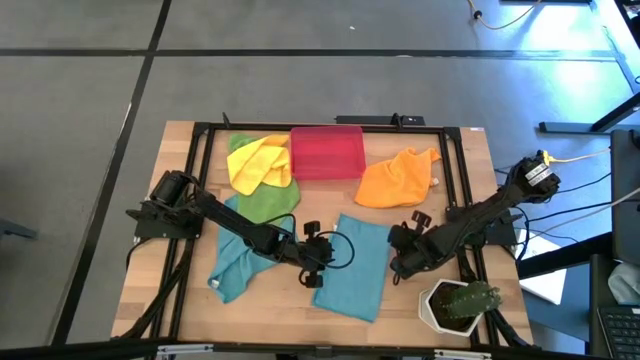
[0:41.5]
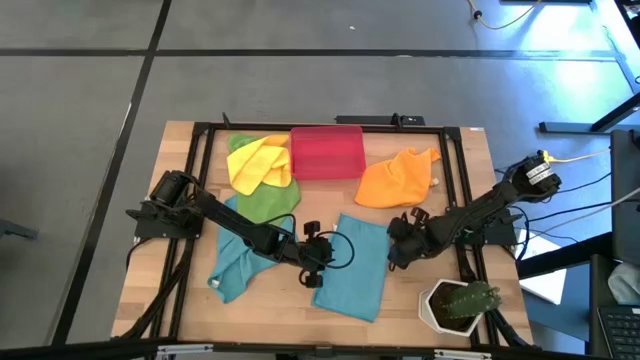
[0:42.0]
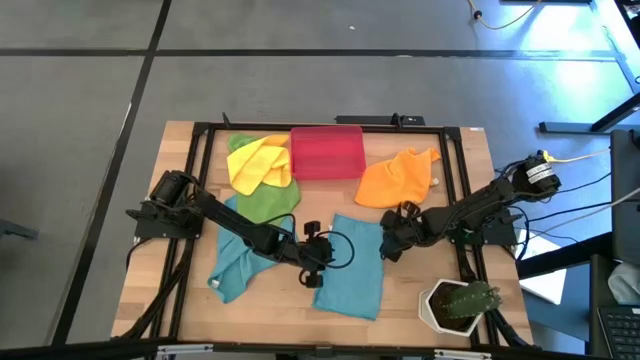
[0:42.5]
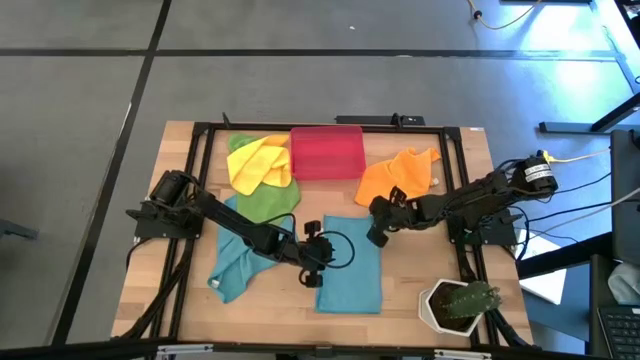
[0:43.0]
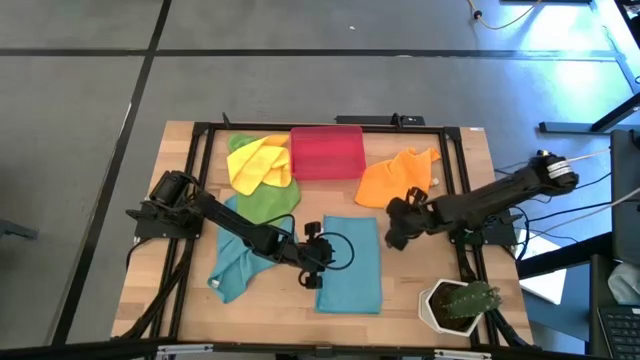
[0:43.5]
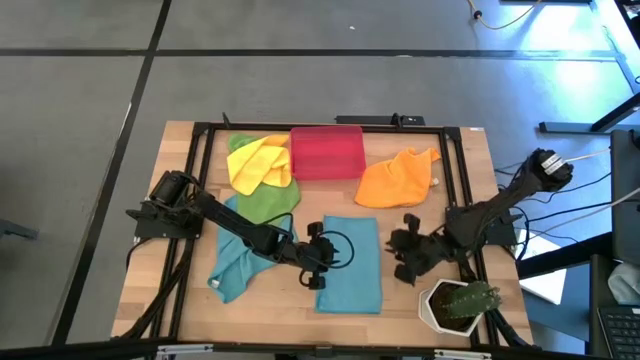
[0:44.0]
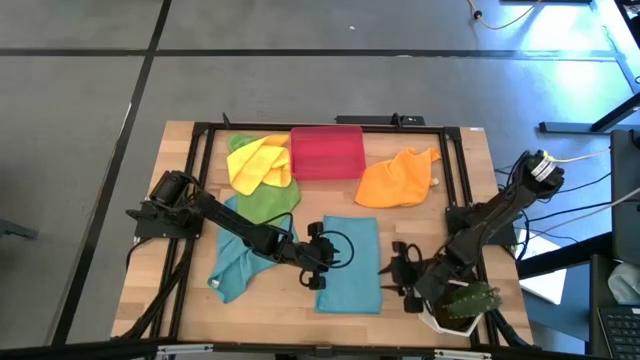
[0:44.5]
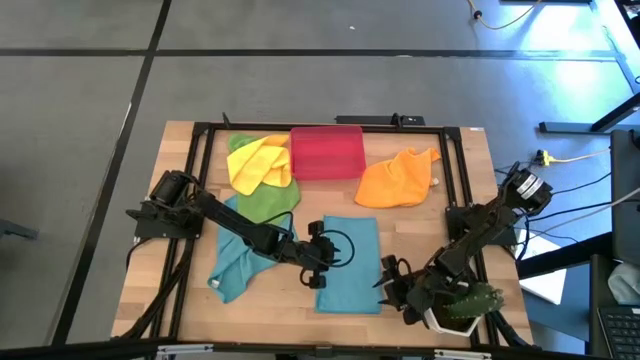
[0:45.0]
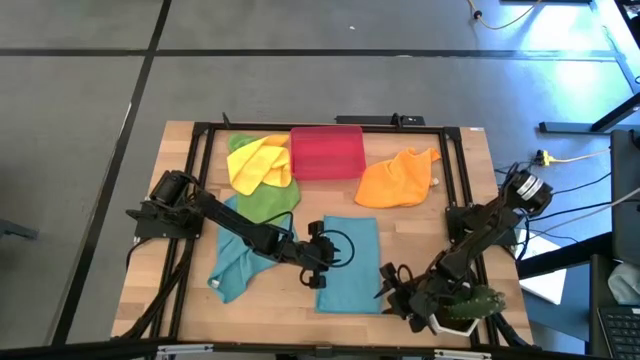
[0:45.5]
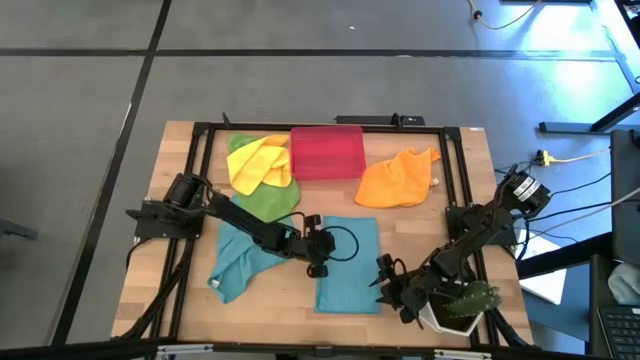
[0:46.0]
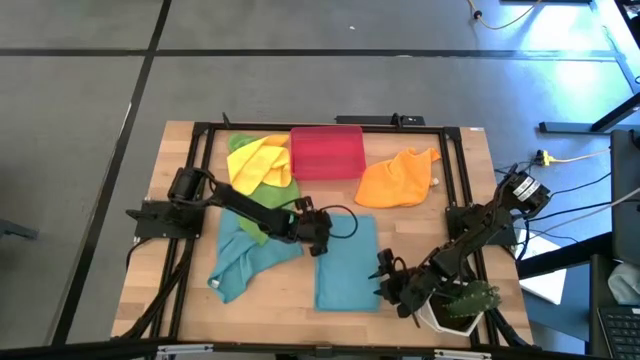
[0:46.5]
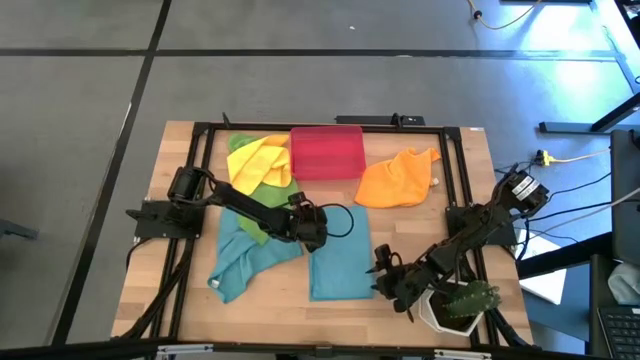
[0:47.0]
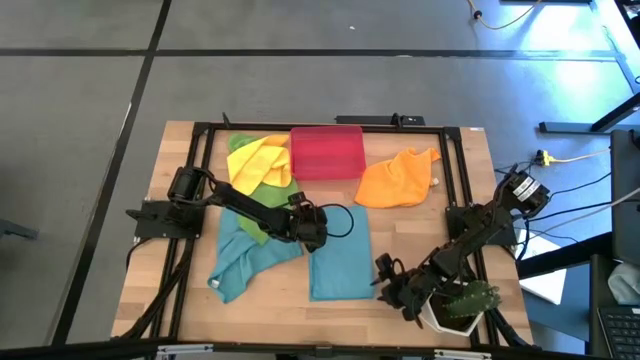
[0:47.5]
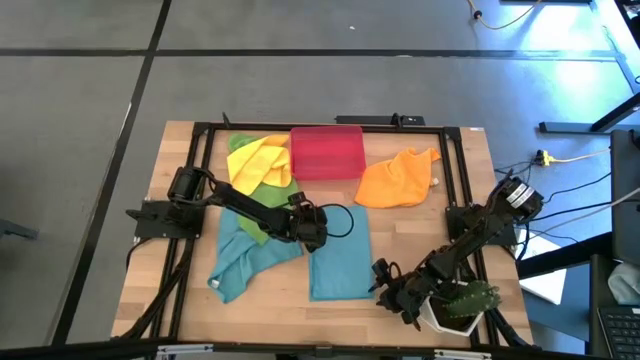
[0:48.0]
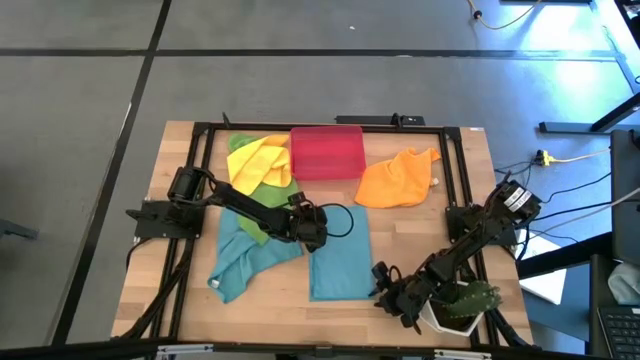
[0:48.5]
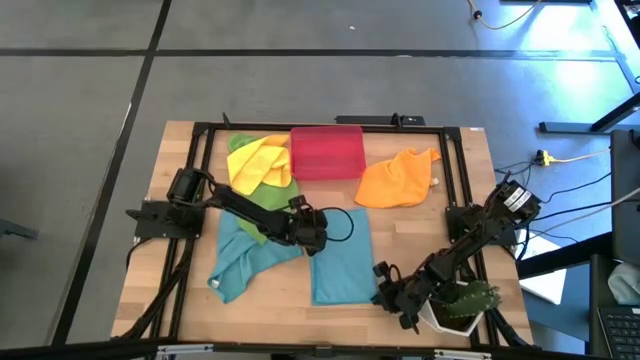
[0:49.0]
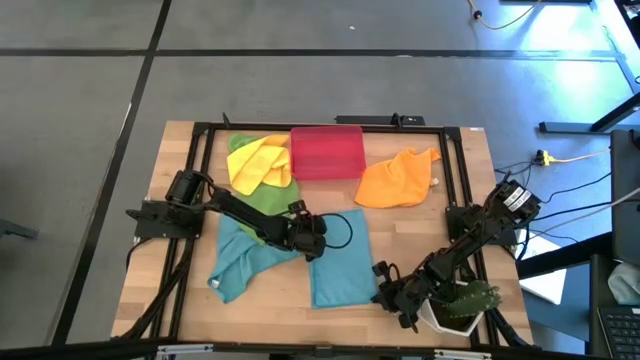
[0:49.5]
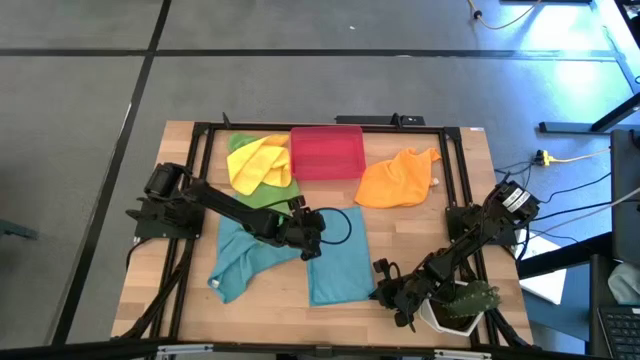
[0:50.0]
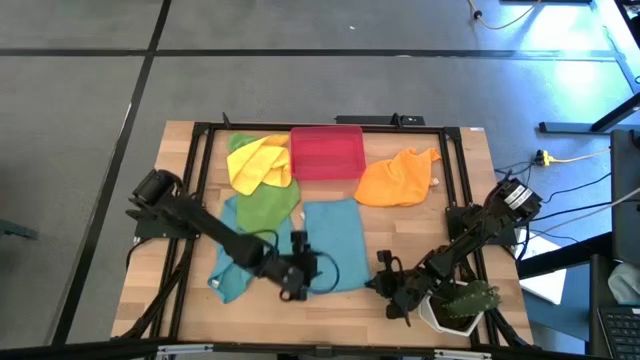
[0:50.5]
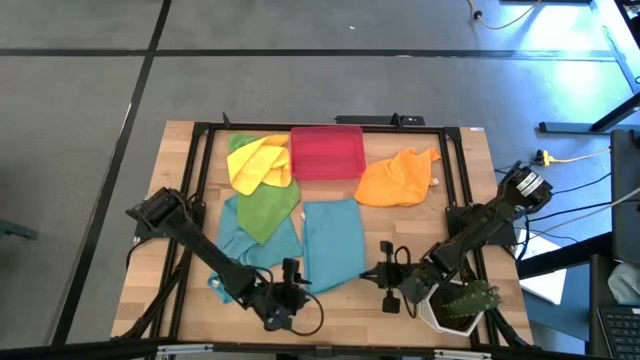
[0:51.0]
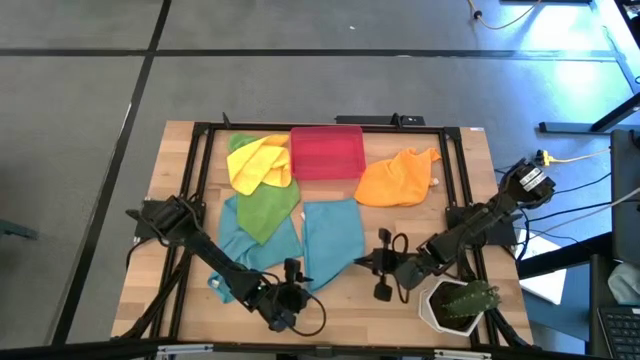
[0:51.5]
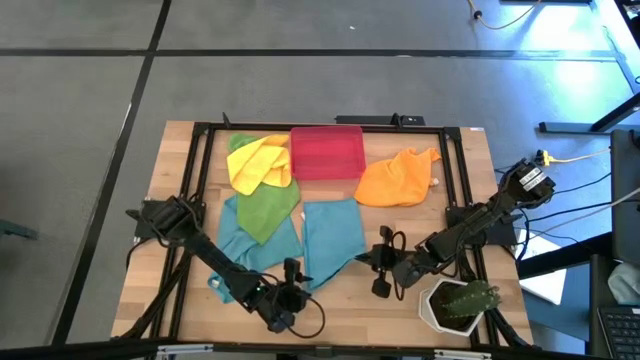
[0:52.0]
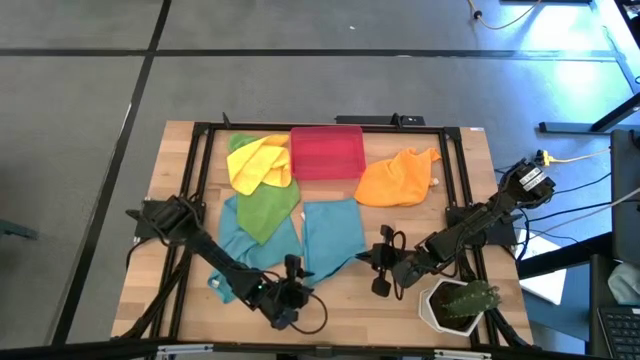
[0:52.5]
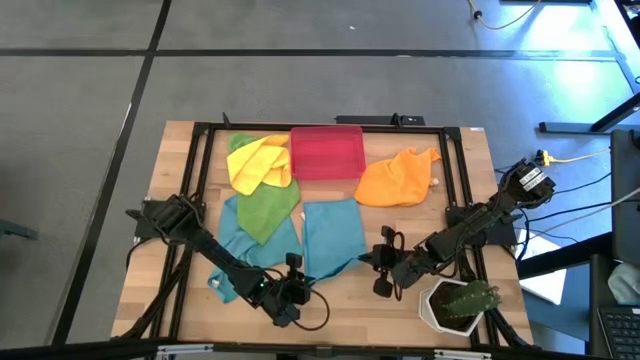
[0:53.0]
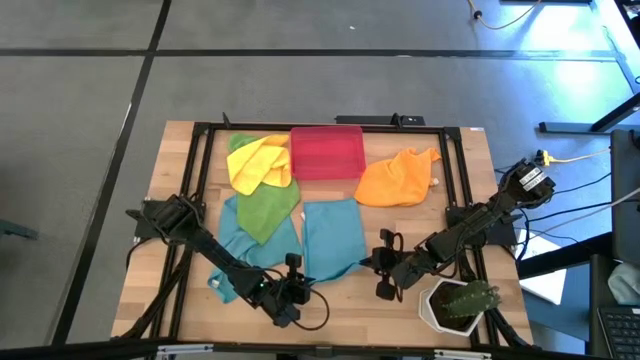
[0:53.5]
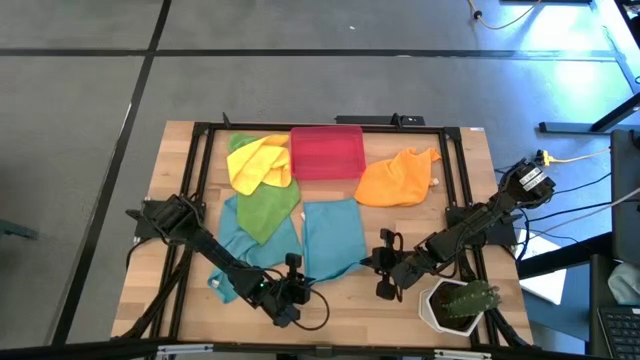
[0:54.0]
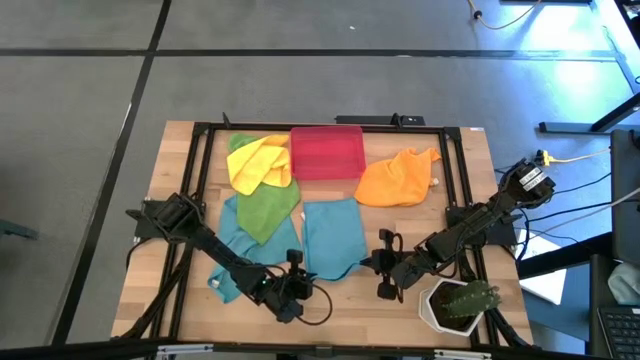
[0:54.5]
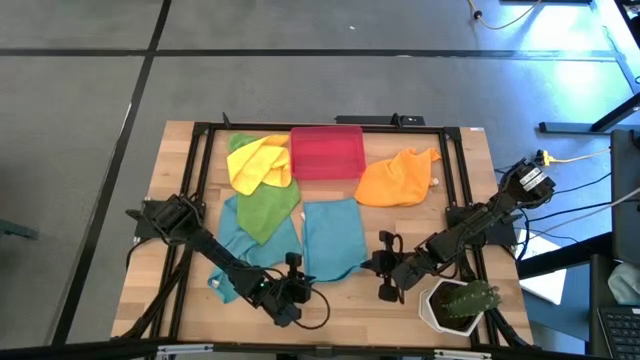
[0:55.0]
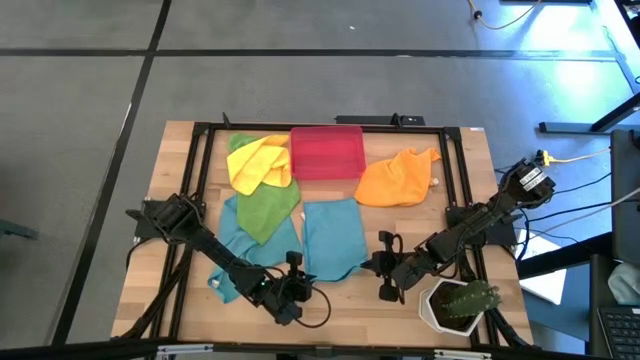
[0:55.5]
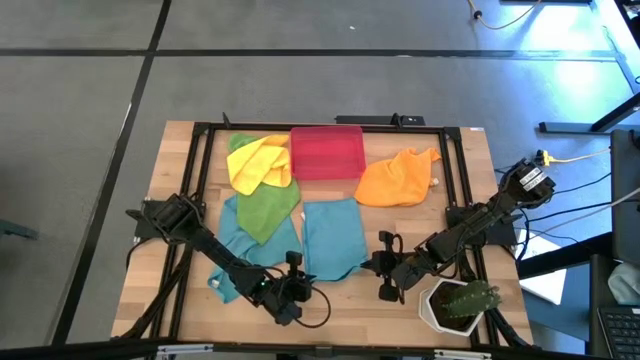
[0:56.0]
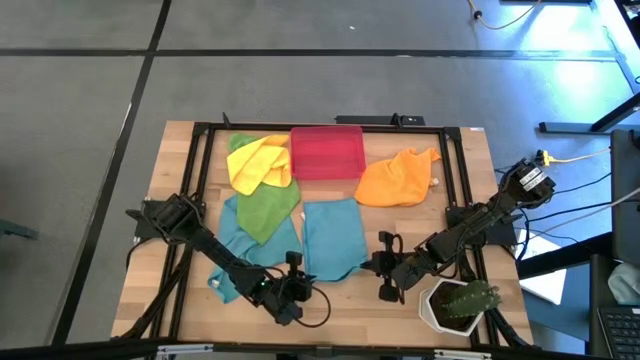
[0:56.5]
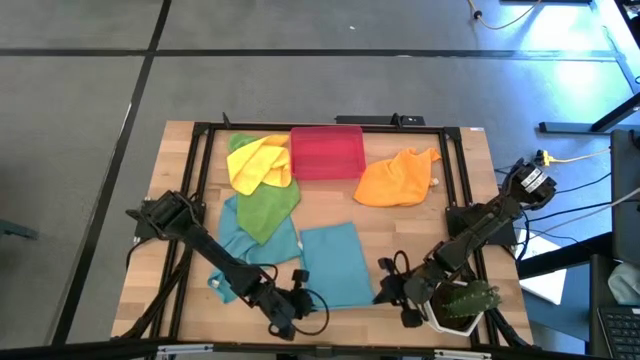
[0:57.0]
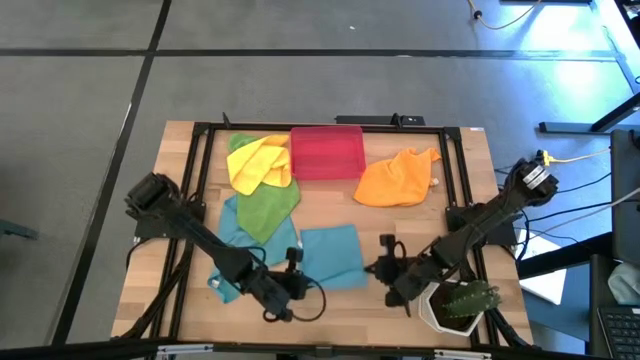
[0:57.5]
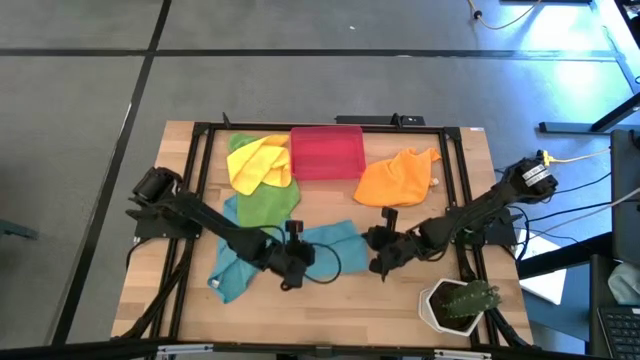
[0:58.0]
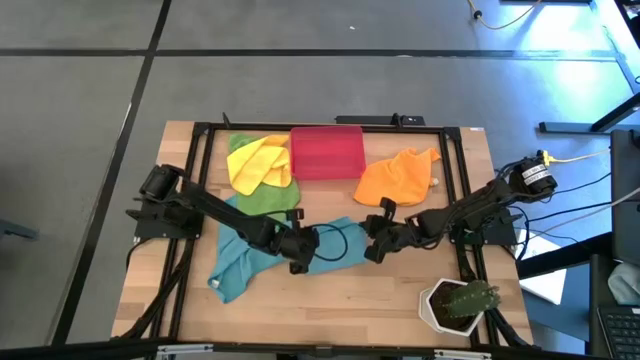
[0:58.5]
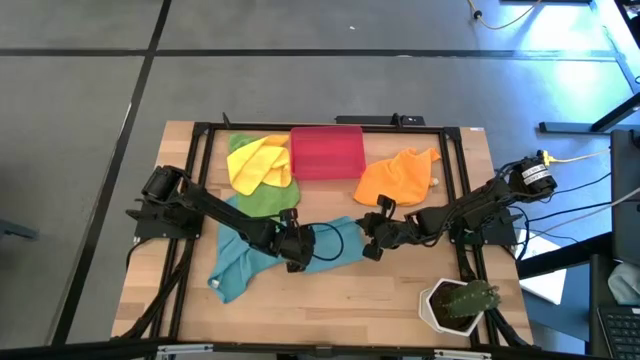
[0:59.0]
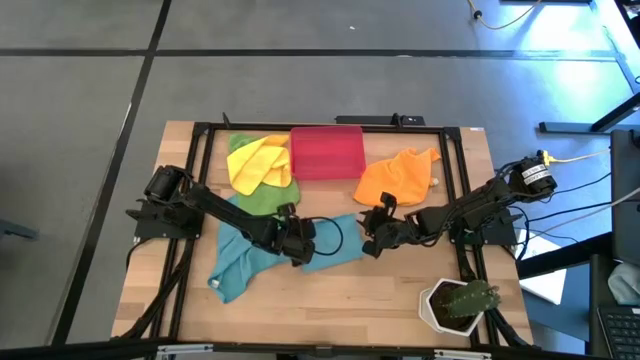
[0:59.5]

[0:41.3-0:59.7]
Task: Roll microfiber towels into tight, uniform cylinder then place into a basket
Fold the right blue microfiber towel
